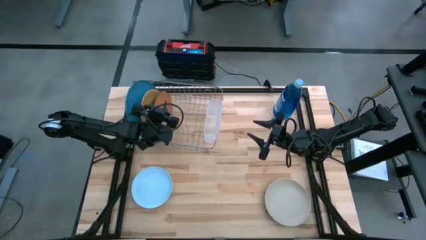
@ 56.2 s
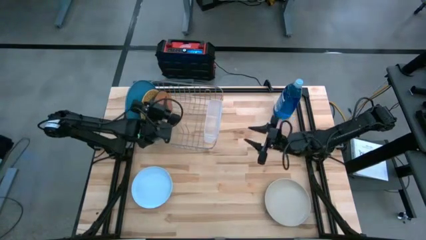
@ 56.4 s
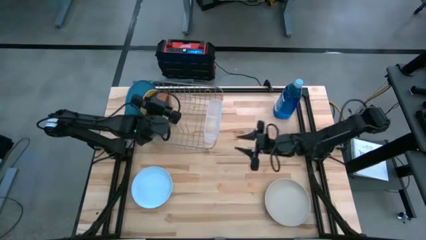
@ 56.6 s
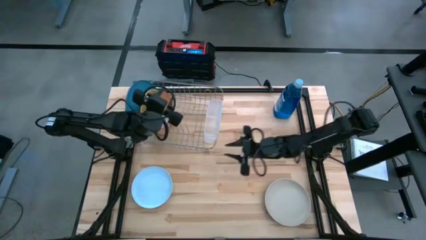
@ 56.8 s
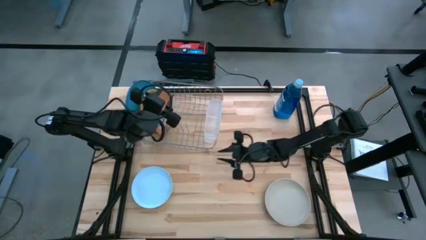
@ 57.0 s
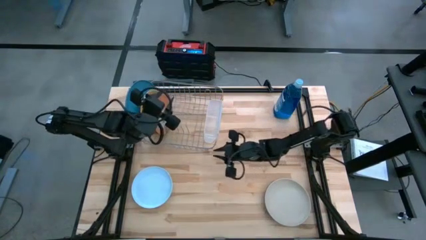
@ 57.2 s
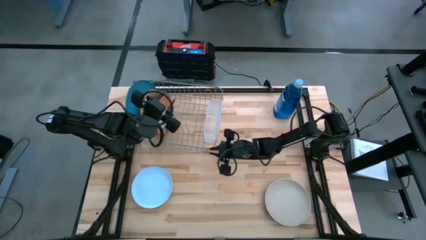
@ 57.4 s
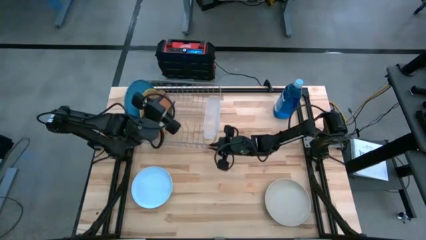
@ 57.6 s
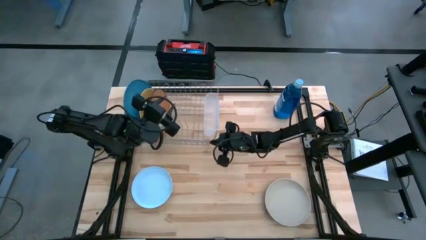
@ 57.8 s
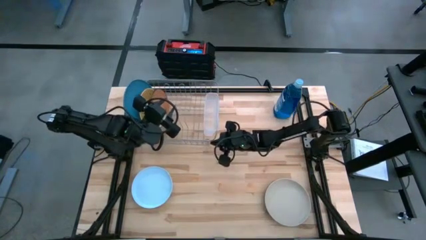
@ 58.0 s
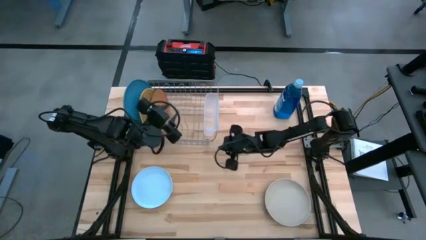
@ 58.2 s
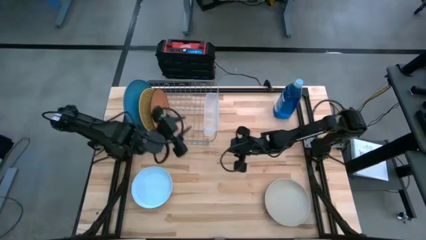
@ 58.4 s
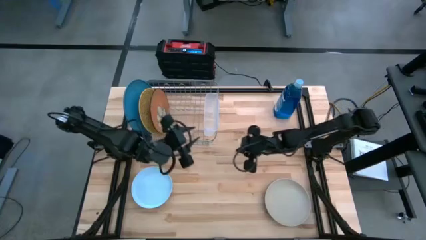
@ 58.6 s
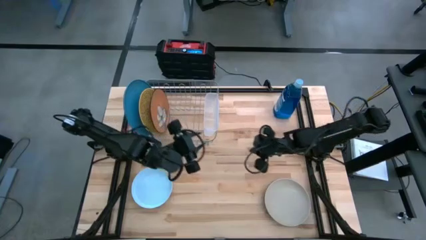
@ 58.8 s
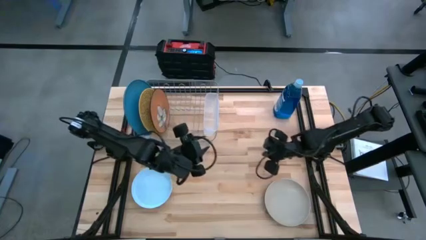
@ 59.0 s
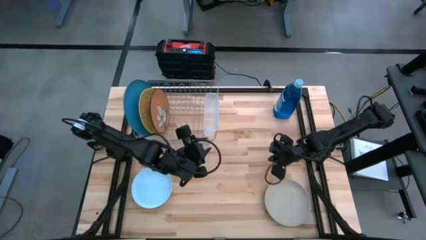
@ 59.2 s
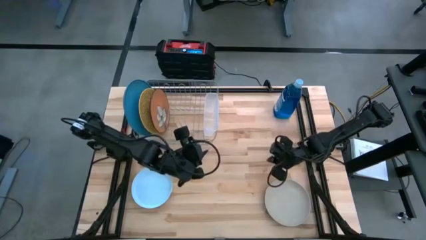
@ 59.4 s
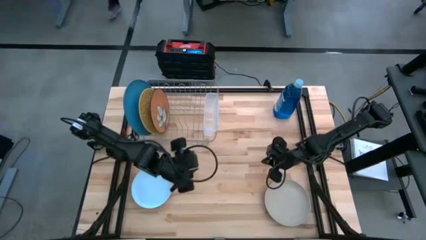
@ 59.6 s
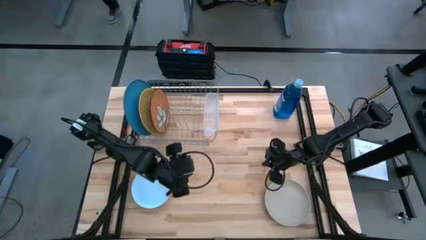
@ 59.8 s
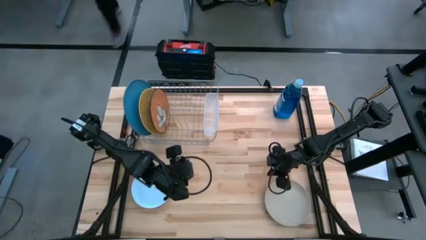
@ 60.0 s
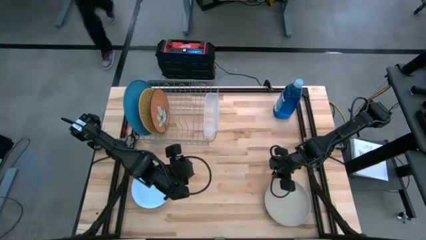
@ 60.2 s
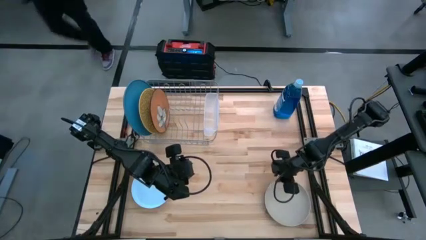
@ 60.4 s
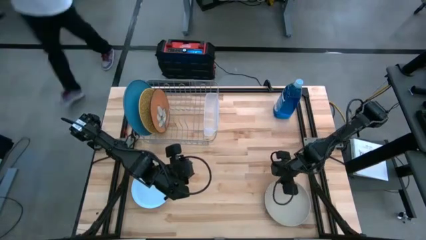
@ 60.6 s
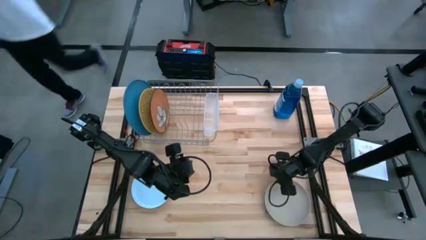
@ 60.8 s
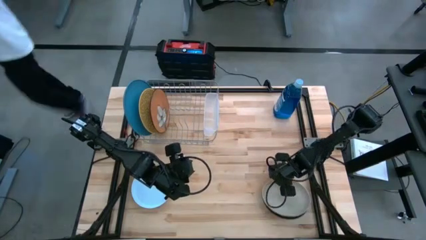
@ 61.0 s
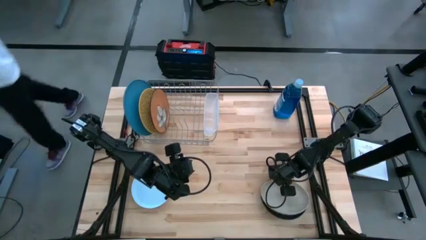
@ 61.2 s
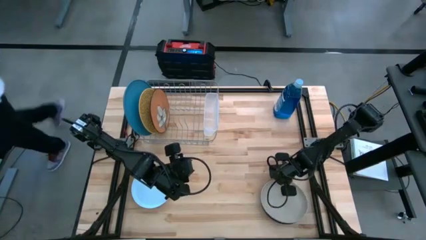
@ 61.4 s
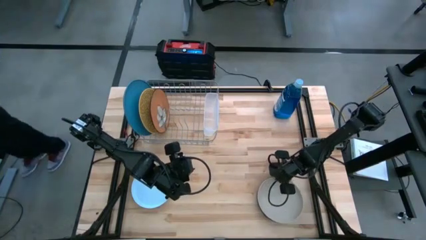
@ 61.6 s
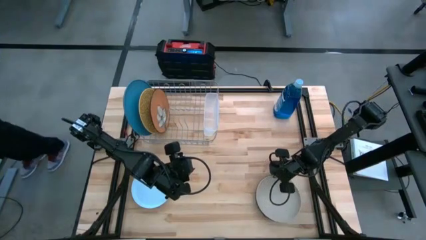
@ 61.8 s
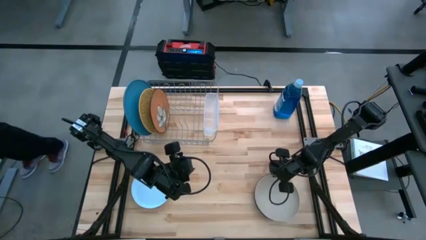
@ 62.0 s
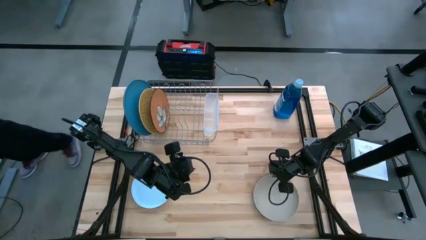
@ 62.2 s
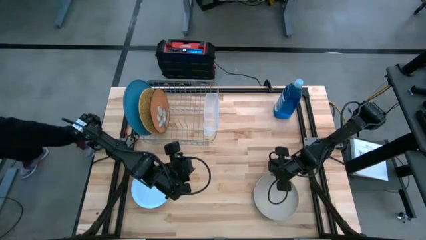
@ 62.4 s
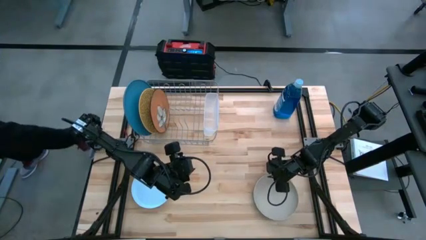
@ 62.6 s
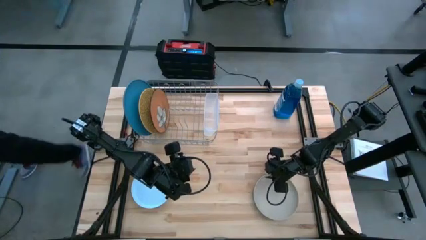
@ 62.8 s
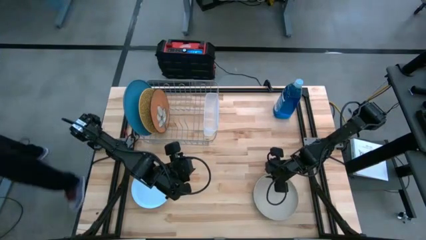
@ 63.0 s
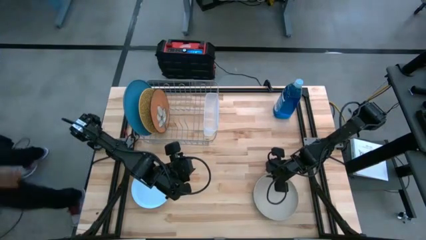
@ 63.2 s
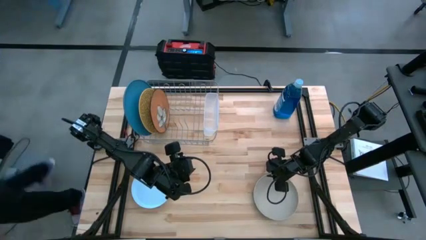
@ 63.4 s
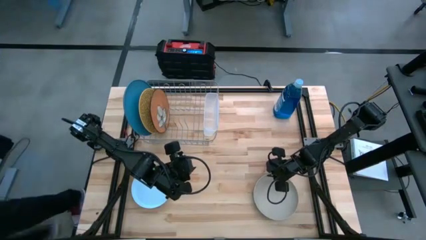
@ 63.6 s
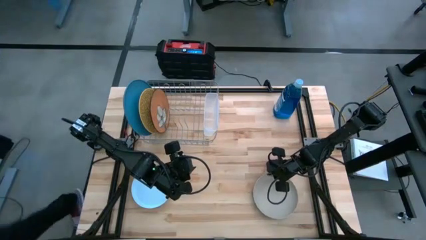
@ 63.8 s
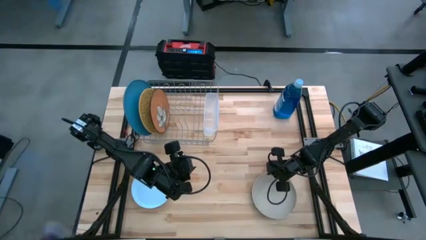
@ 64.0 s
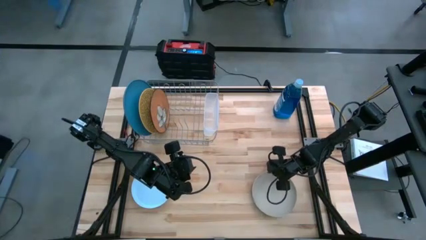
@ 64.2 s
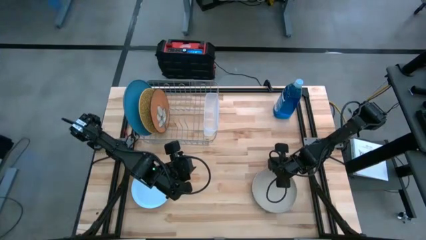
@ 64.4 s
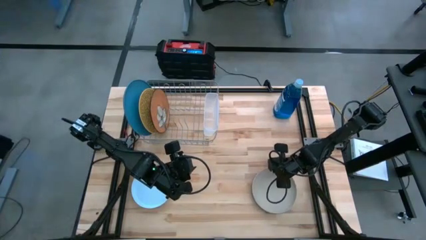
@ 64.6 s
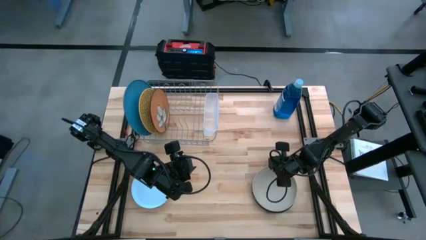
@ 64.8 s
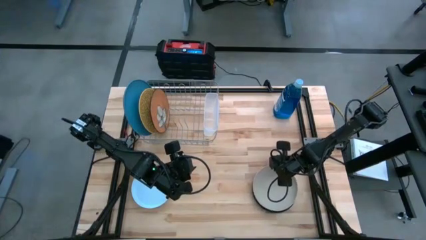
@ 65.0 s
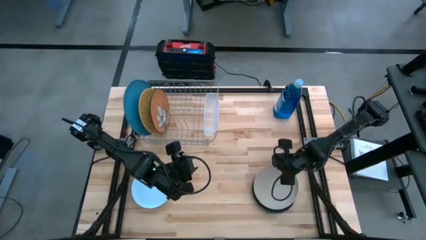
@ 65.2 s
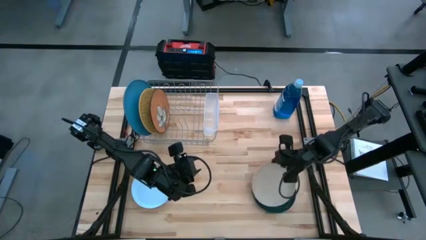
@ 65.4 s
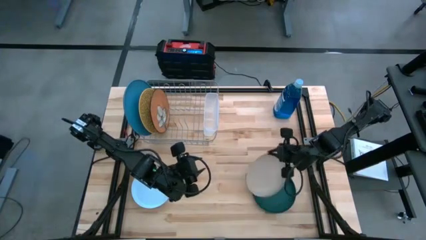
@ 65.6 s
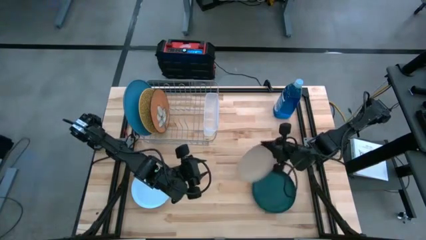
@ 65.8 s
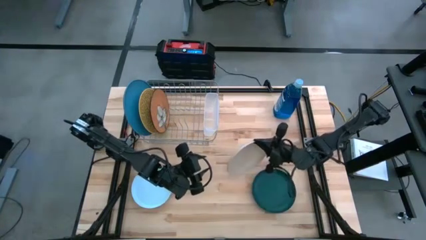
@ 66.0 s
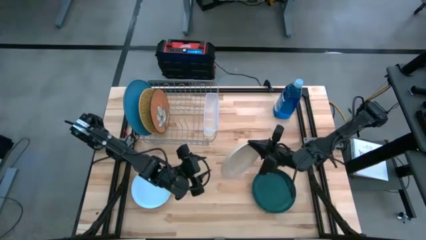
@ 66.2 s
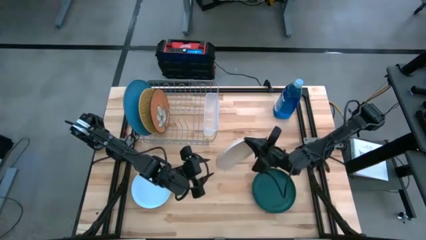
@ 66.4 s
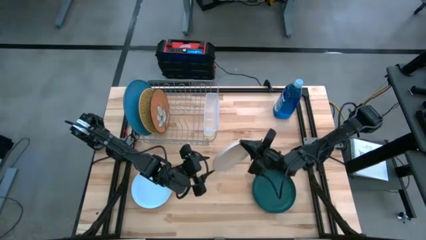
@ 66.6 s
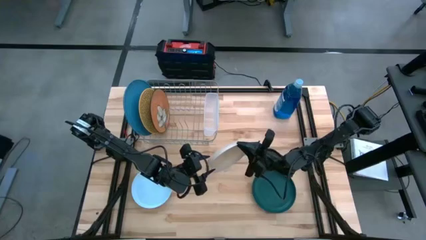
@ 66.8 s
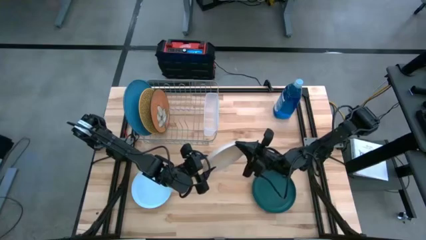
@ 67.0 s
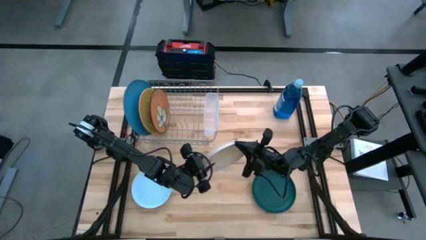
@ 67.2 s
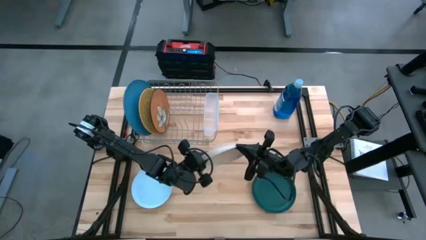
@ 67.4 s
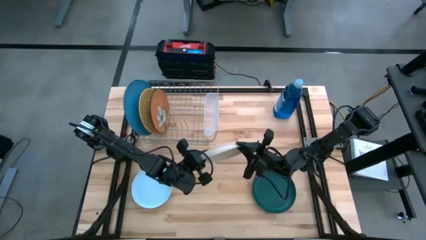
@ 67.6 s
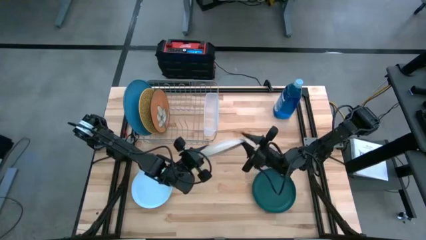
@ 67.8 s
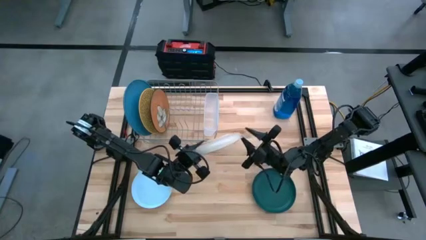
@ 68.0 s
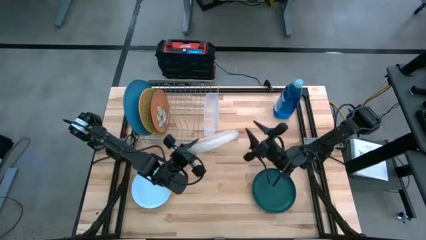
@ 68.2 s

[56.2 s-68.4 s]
Task: Sort dishes
Put the gray plate in the dish rack
